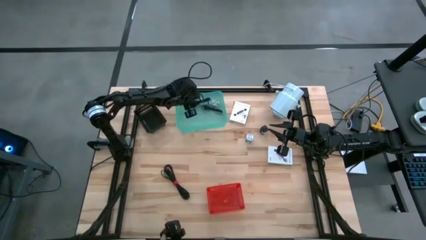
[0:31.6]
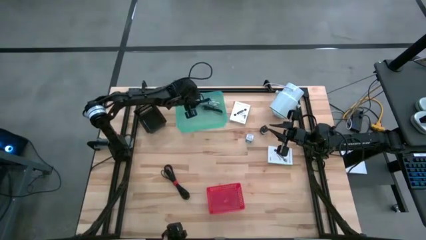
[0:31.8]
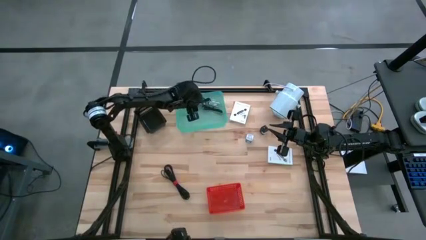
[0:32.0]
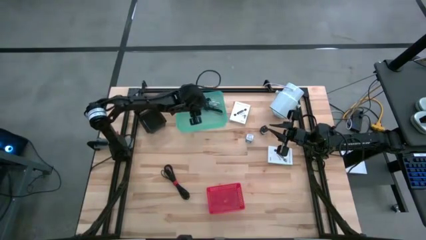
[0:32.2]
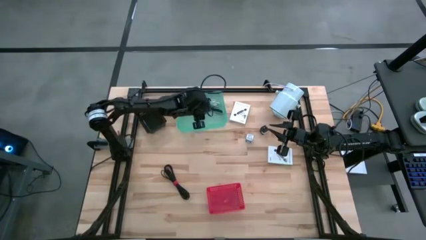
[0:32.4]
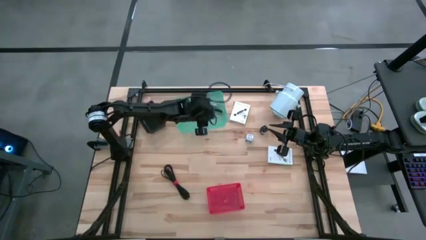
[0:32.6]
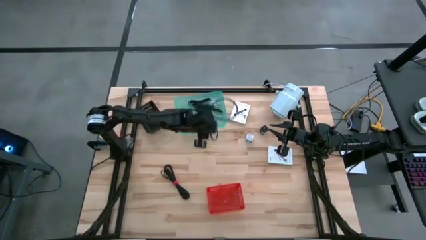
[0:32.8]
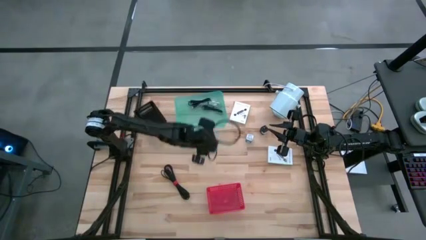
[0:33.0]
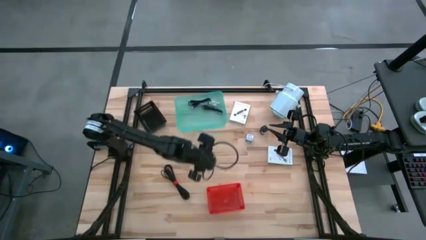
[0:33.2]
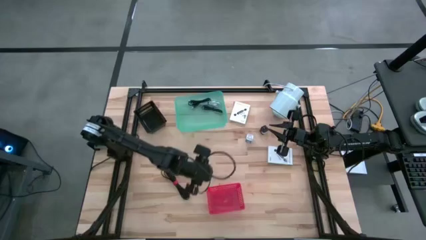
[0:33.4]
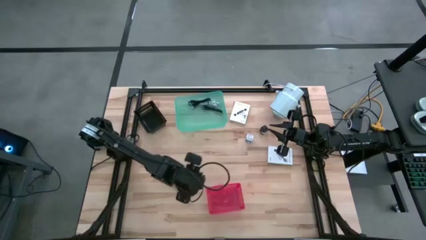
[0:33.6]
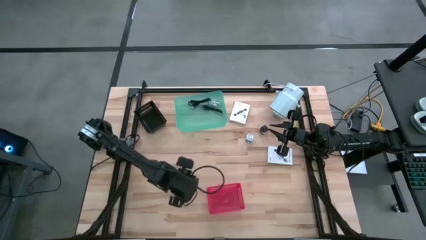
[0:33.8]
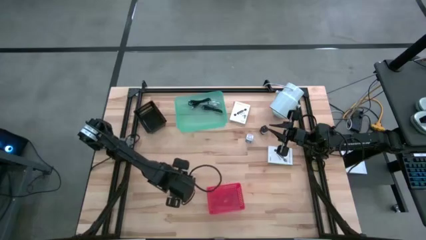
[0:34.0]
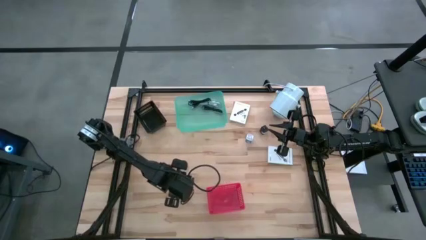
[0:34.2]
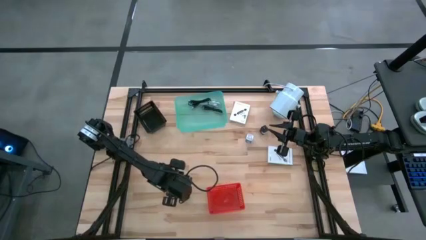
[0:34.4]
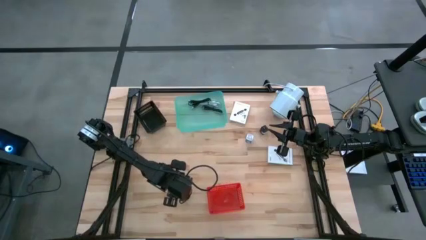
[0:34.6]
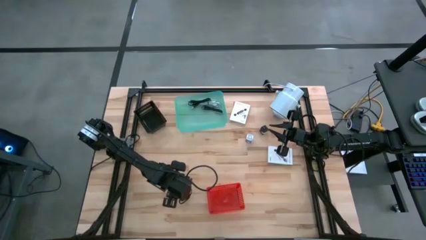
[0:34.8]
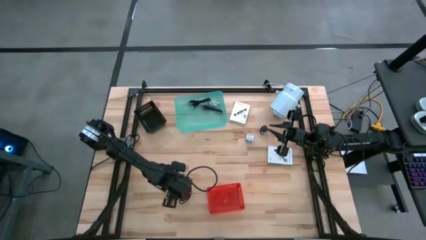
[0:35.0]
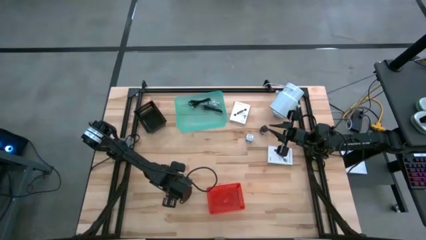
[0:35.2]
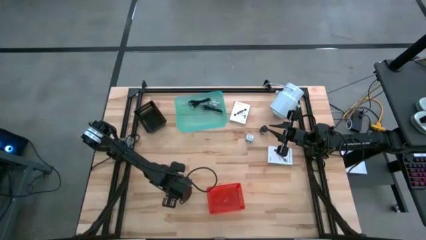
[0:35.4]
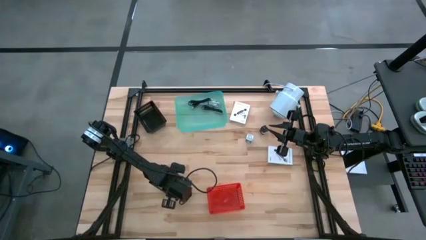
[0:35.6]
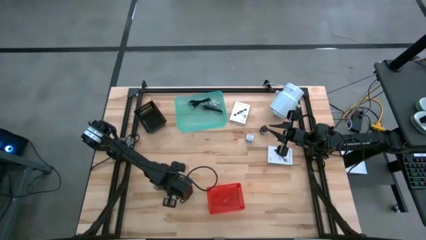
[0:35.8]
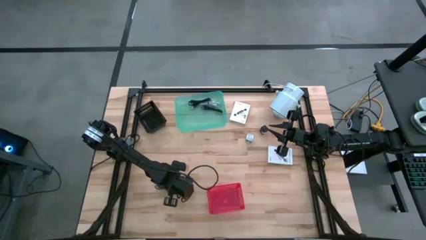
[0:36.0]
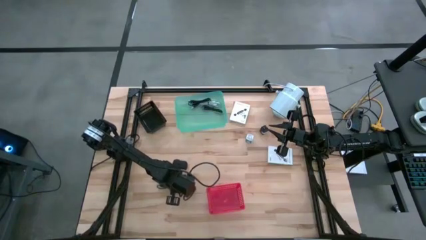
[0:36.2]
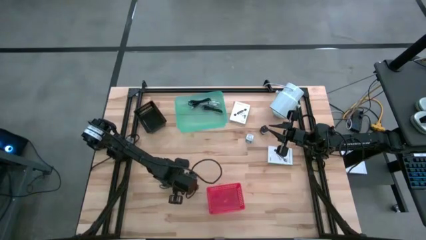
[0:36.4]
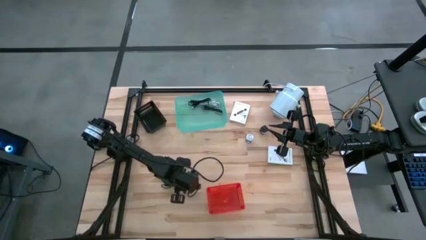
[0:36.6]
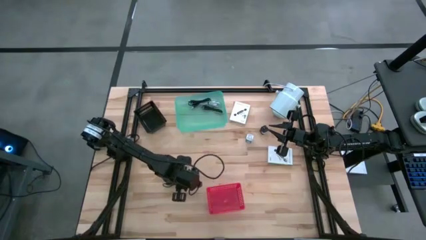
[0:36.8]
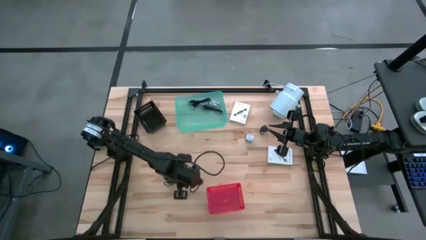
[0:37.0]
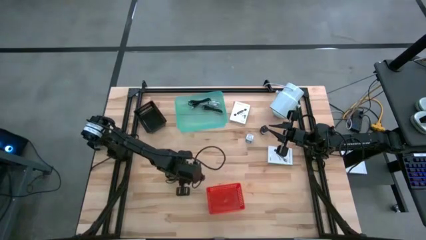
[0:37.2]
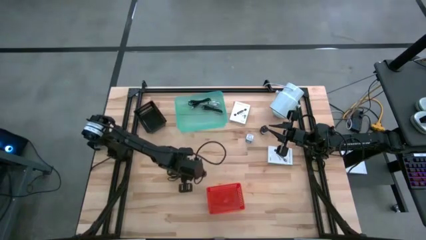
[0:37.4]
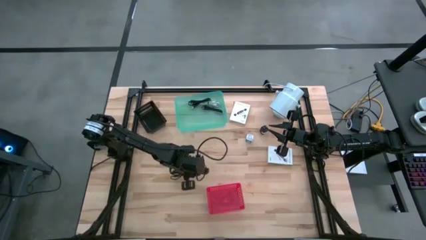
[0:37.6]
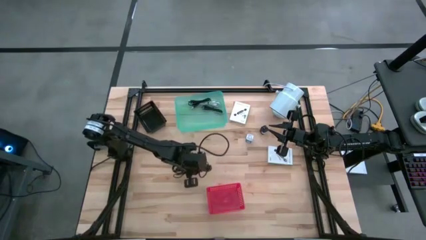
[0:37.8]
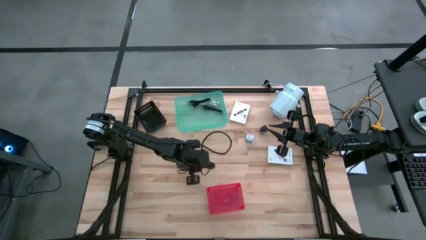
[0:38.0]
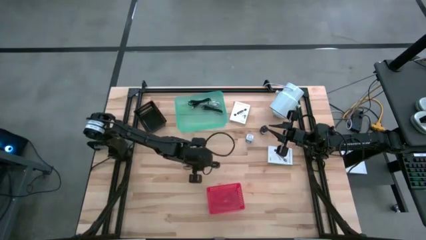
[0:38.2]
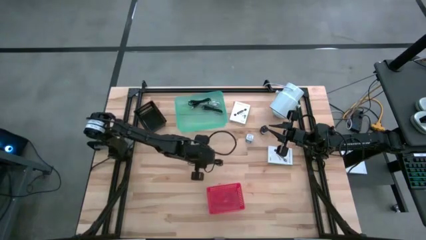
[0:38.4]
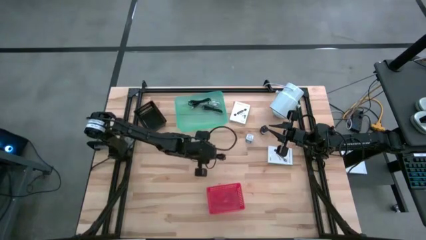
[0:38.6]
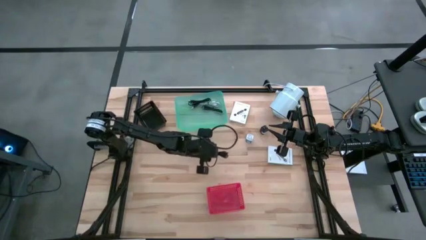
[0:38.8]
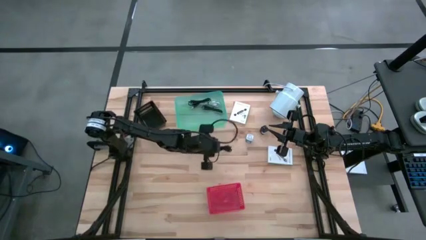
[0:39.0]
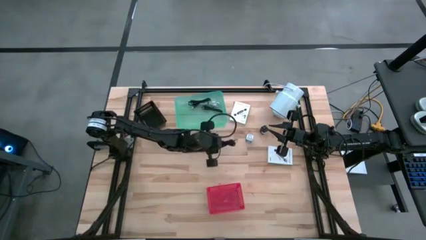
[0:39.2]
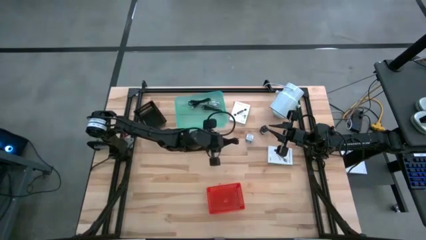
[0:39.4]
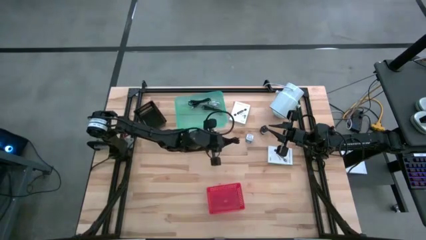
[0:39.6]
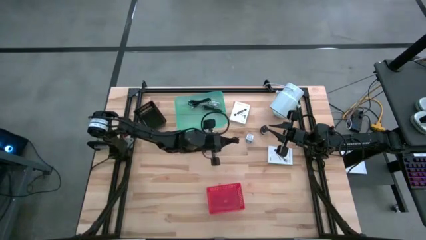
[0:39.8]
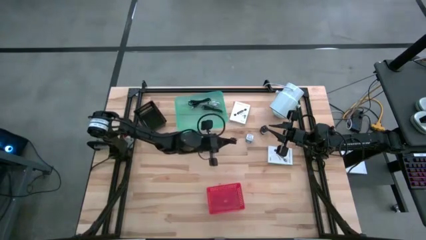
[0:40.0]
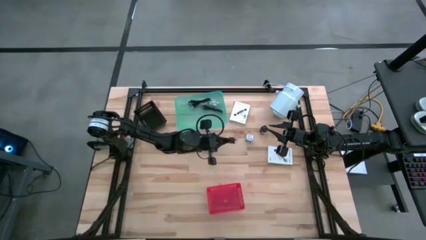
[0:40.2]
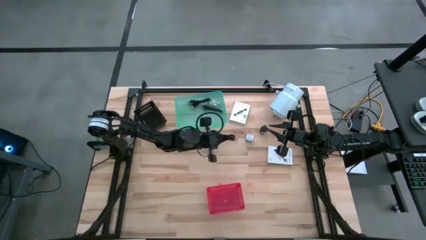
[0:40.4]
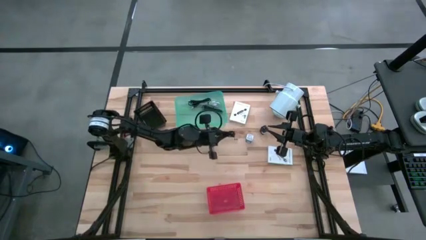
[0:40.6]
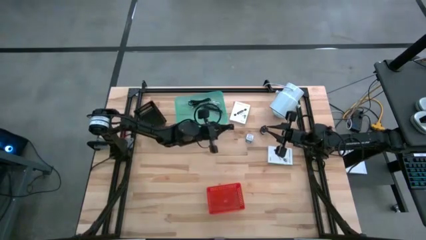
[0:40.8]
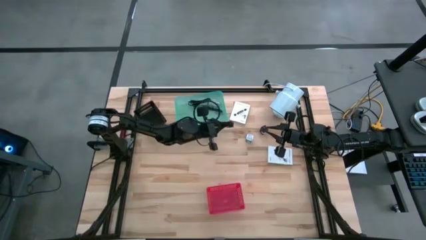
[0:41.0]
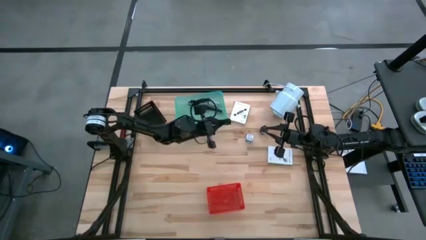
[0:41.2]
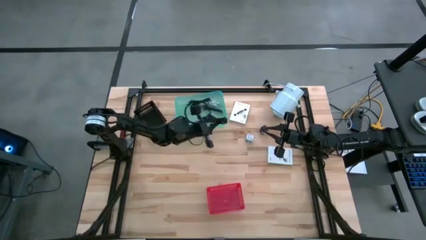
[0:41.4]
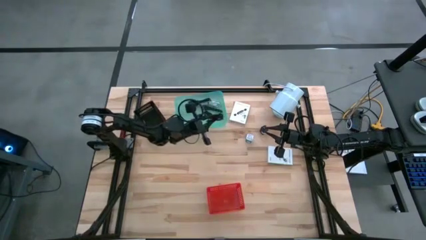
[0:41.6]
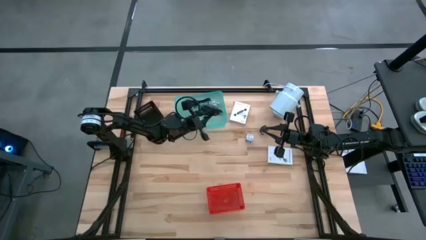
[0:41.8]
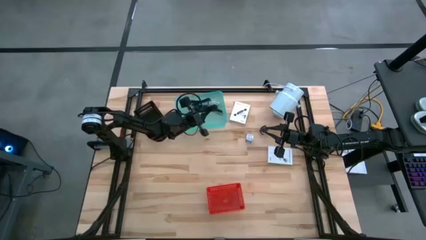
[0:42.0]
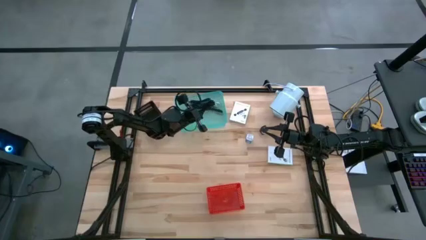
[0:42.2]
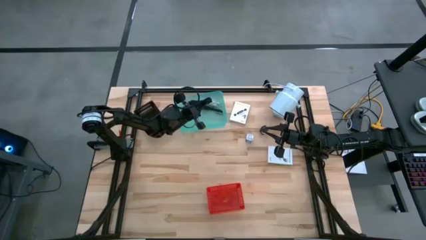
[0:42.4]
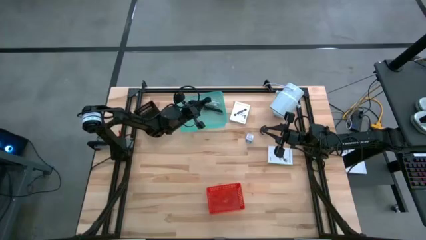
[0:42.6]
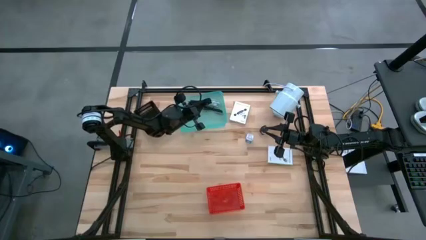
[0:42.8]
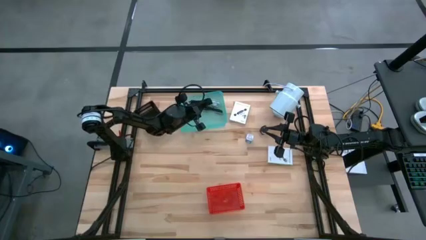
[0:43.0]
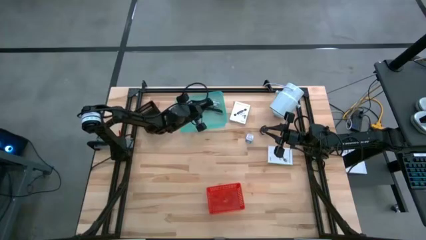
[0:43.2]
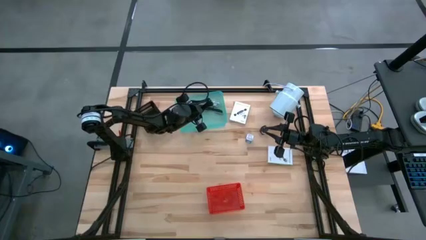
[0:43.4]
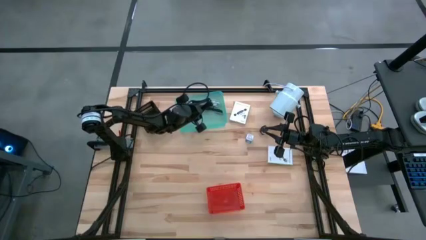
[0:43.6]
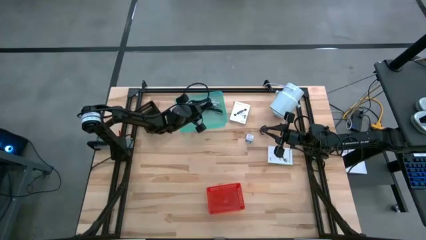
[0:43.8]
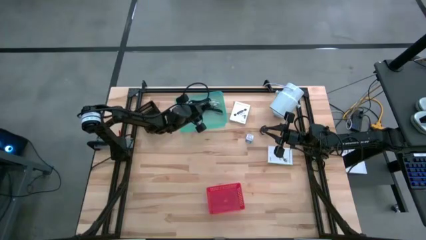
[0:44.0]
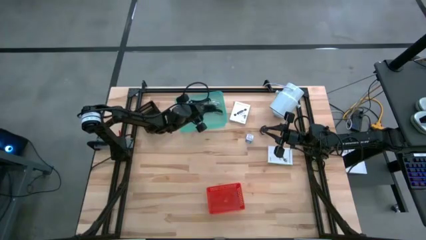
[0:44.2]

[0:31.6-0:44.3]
Task: Pick and place items into bin
Put the black charger cable into the green bin
